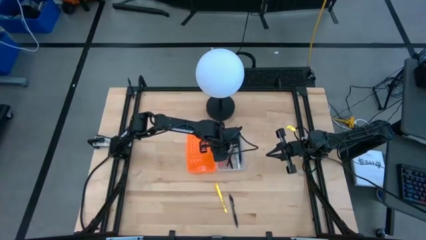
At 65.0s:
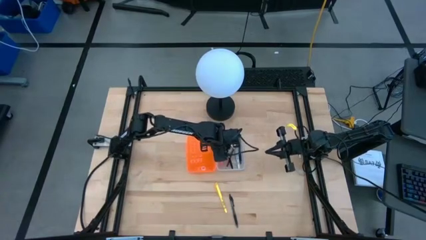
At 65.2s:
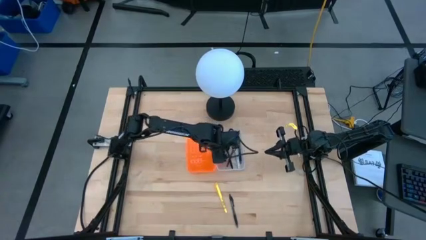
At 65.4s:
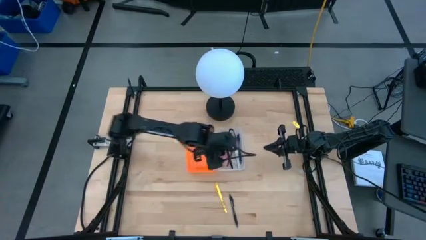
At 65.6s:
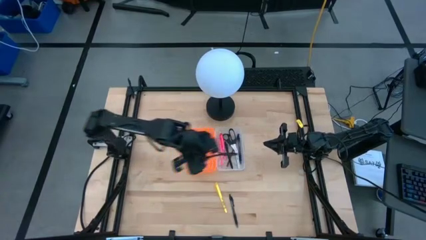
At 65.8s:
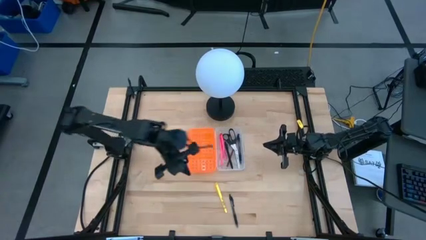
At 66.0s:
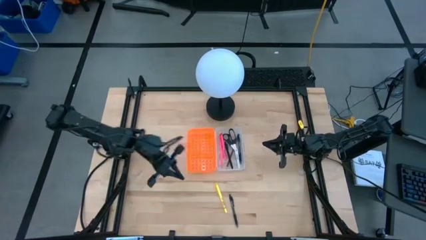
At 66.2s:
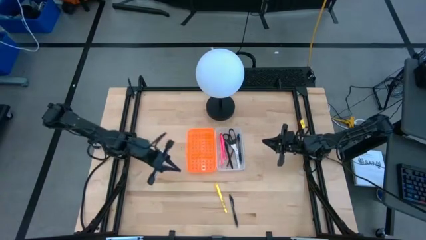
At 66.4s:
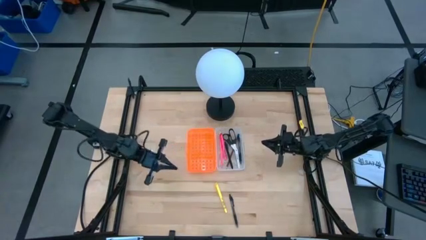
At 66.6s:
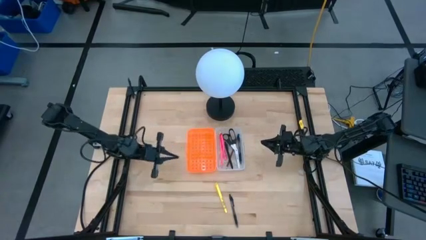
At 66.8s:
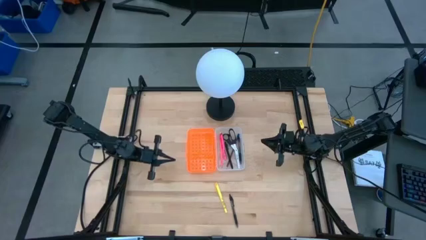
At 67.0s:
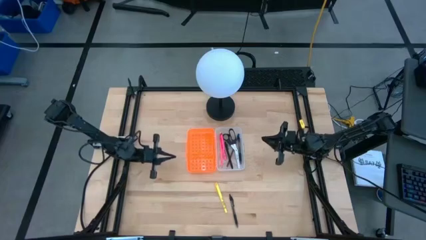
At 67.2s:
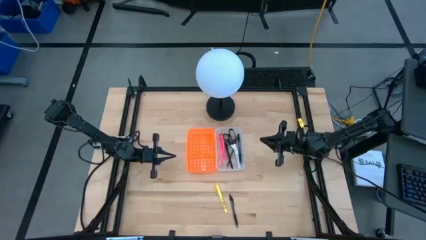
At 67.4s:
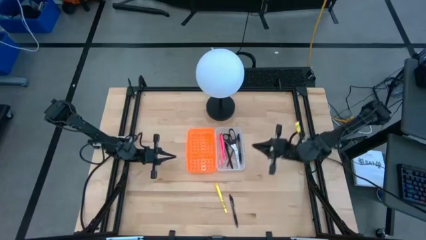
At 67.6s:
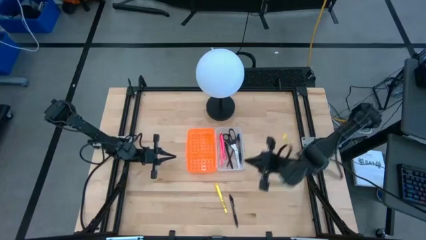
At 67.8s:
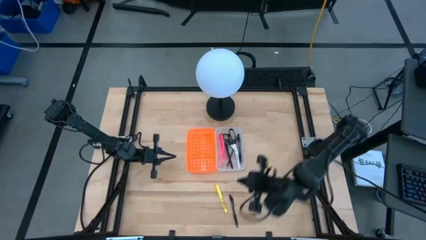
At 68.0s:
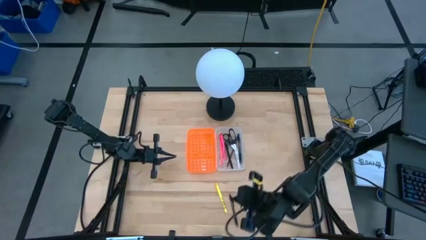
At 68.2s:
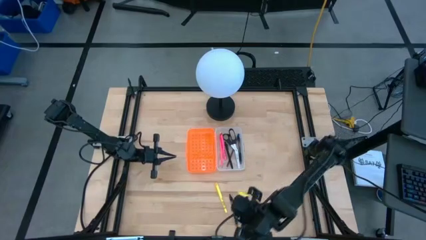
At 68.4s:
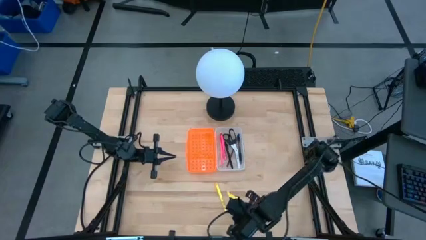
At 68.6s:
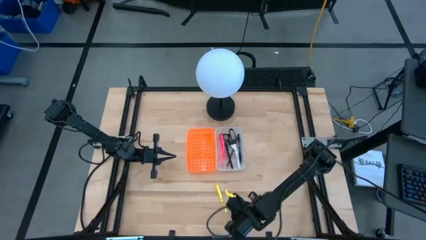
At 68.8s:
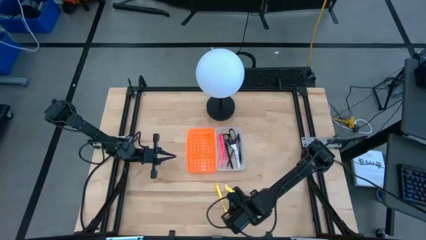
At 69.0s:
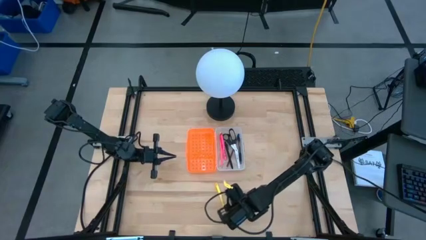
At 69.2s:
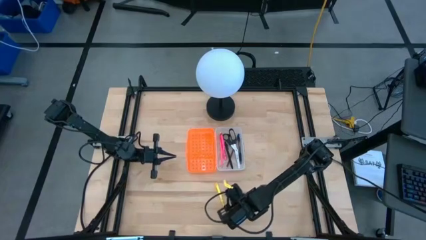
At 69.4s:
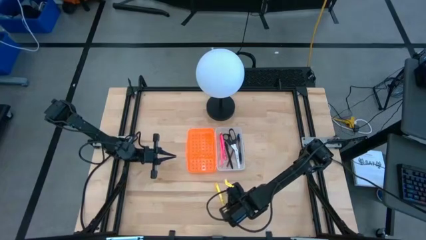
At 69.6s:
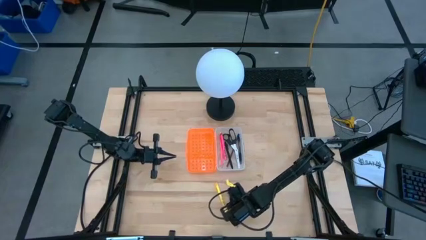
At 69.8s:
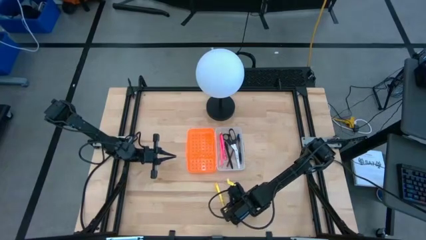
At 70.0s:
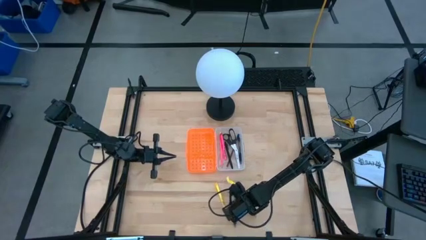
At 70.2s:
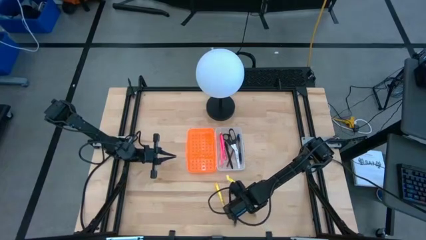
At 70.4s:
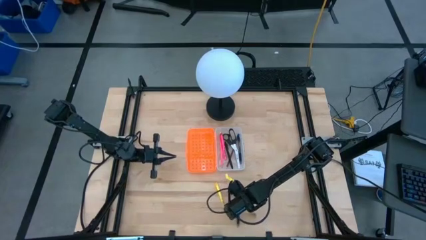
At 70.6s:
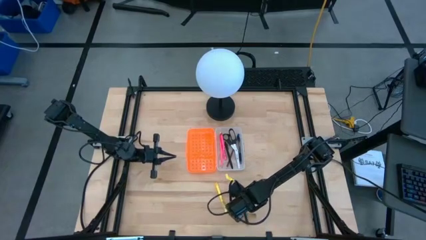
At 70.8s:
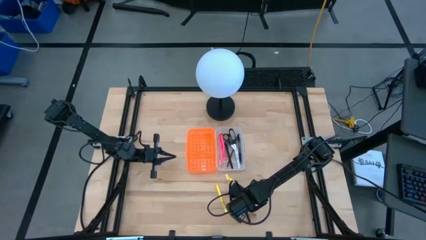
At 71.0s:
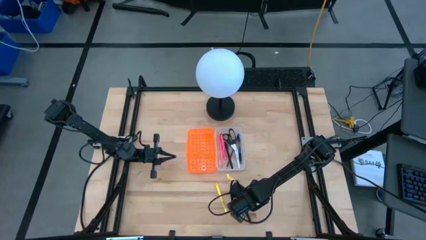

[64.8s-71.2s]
Task: Pick & place school supplies into a supply box
Put the black pen into the pencil box

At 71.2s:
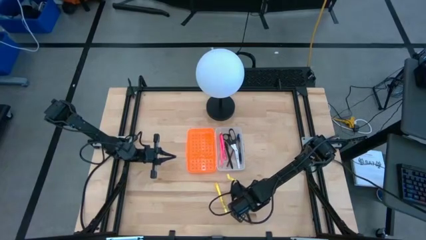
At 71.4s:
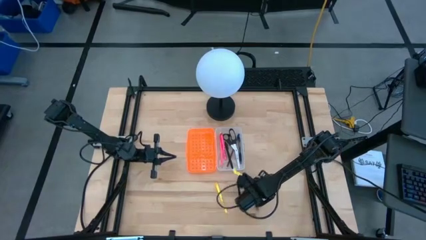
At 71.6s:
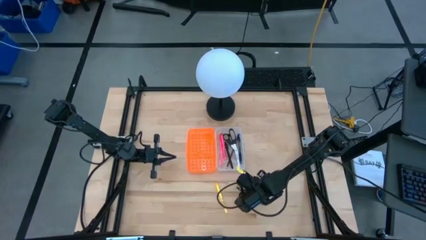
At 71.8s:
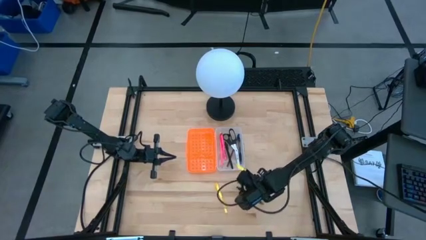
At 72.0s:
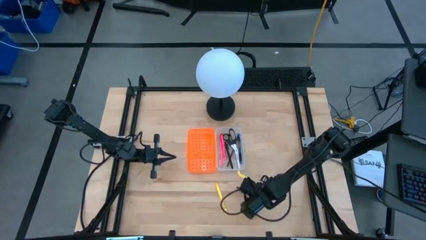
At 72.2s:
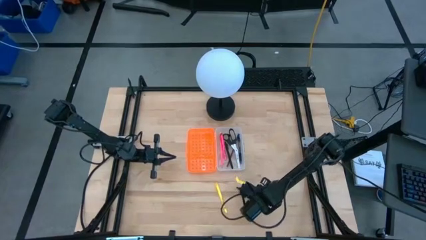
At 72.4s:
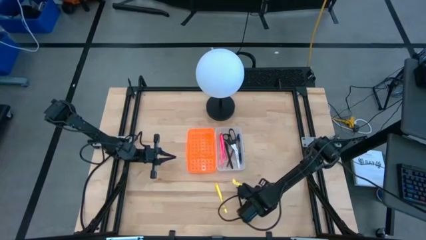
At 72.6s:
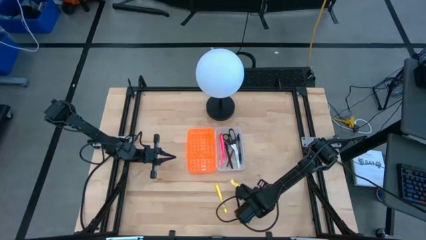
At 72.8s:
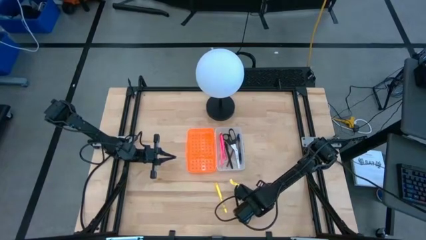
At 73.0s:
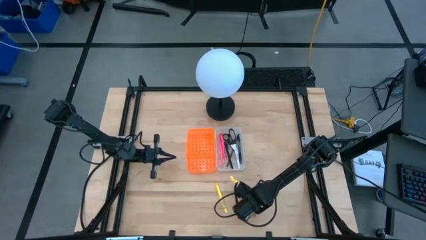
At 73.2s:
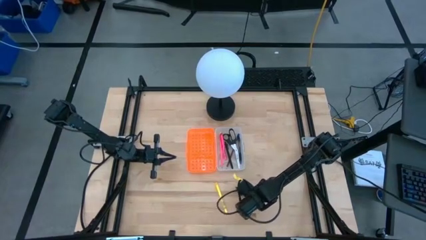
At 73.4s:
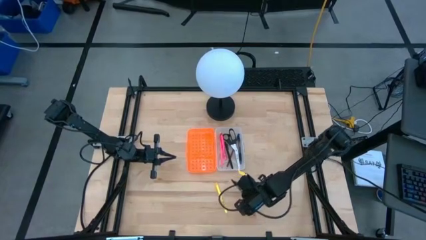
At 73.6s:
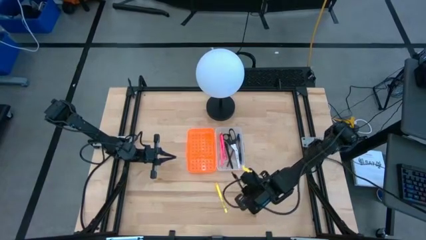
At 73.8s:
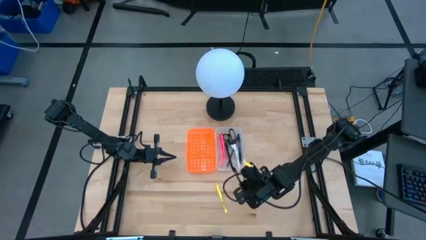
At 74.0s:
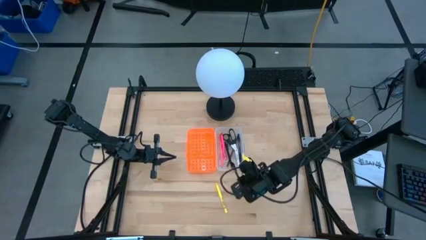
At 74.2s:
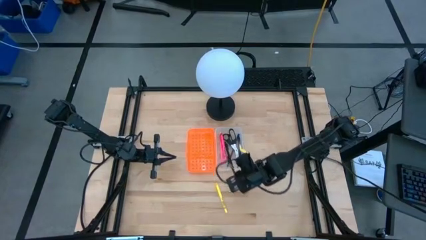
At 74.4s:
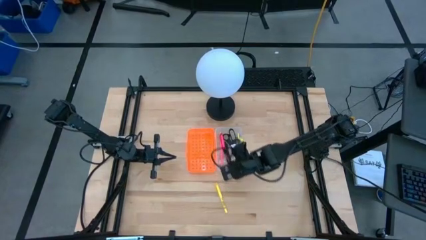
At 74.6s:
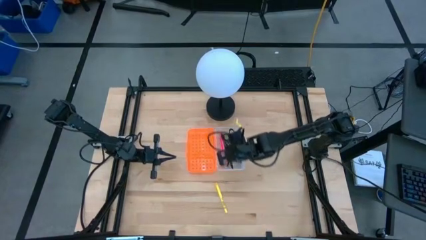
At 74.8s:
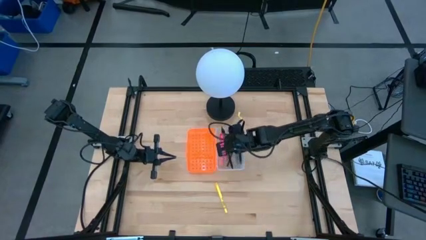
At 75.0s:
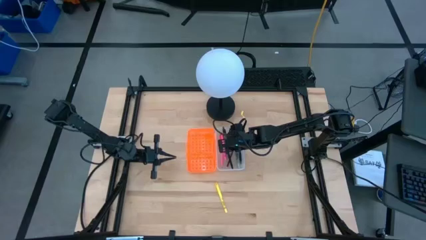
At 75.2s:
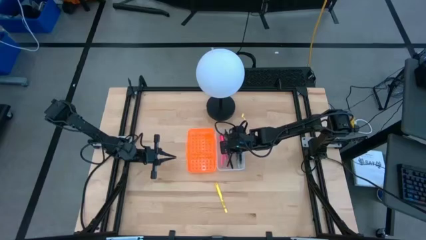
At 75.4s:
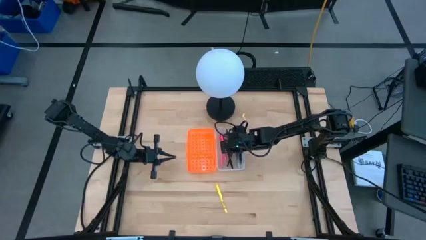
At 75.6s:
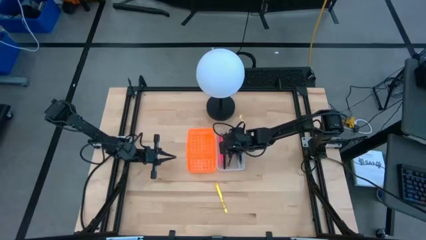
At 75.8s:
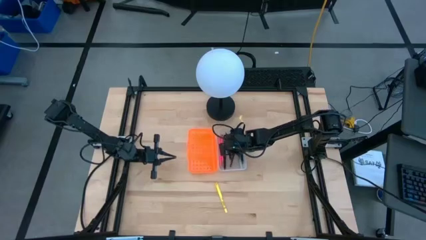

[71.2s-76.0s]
Put the black pen into the pencil box

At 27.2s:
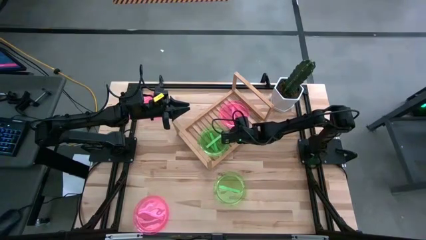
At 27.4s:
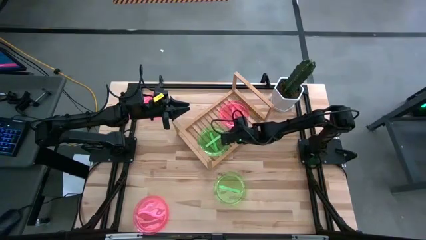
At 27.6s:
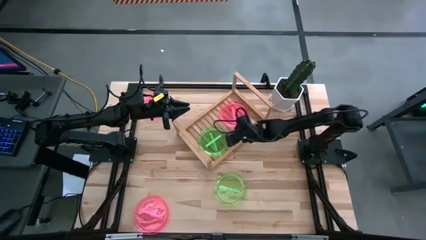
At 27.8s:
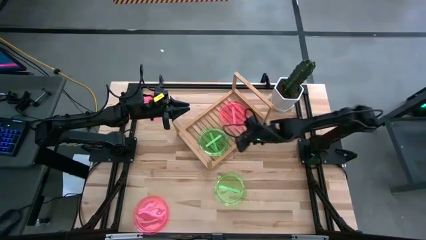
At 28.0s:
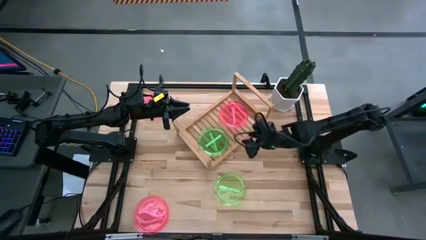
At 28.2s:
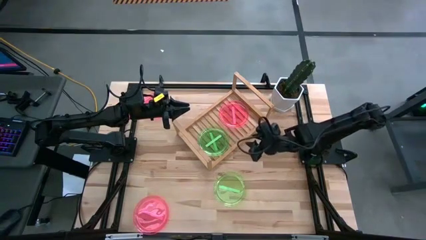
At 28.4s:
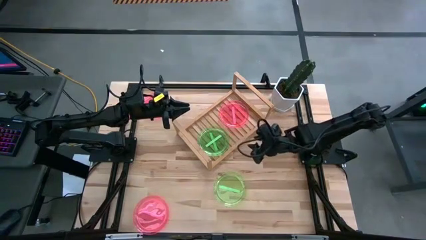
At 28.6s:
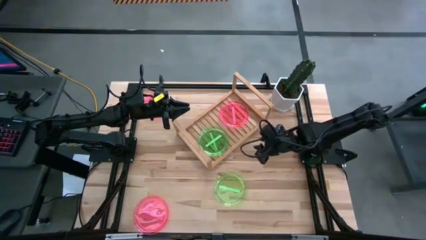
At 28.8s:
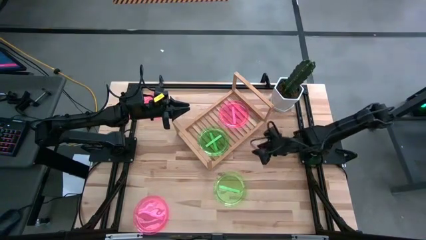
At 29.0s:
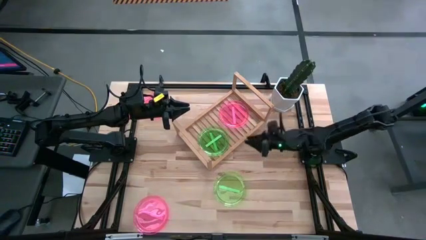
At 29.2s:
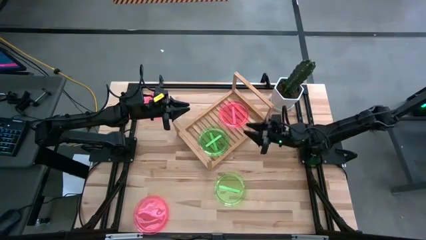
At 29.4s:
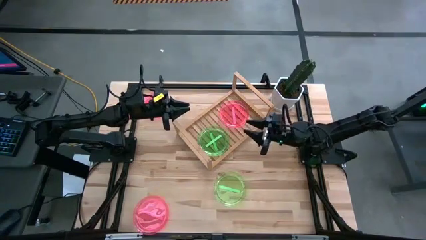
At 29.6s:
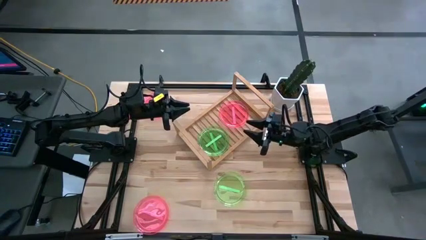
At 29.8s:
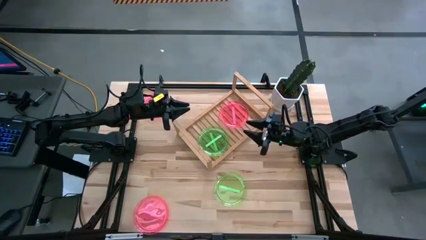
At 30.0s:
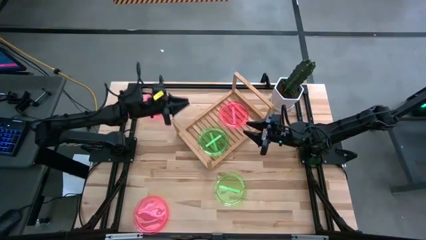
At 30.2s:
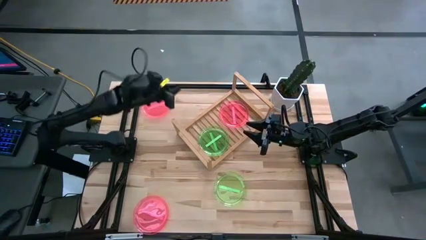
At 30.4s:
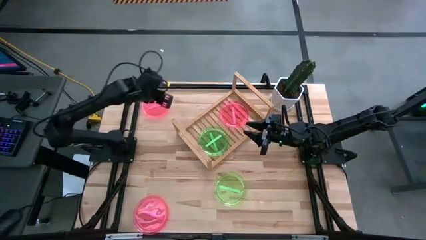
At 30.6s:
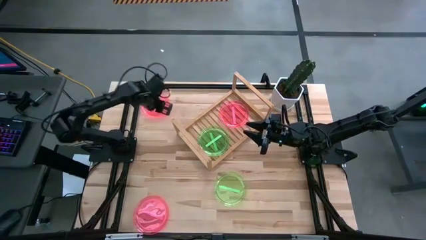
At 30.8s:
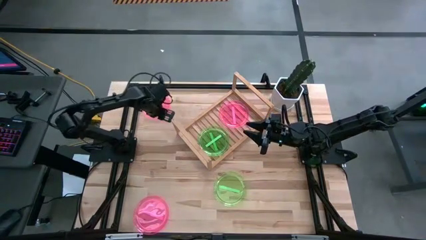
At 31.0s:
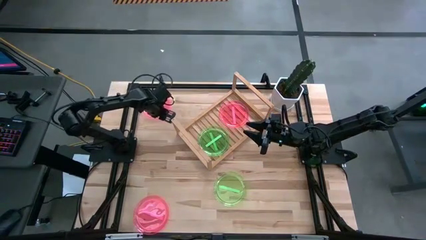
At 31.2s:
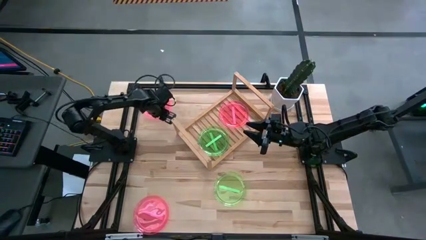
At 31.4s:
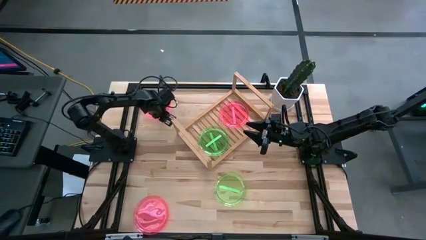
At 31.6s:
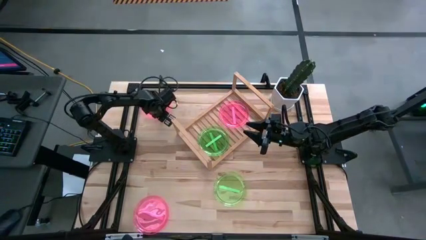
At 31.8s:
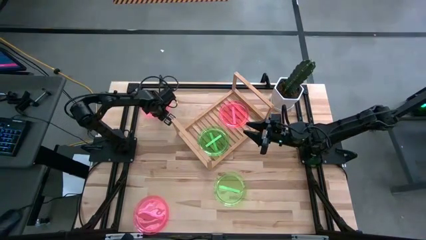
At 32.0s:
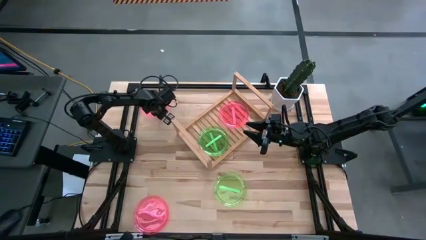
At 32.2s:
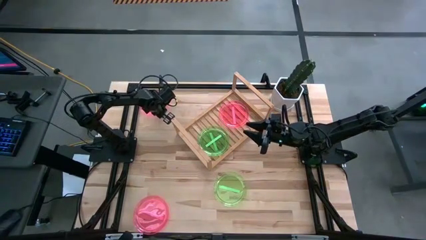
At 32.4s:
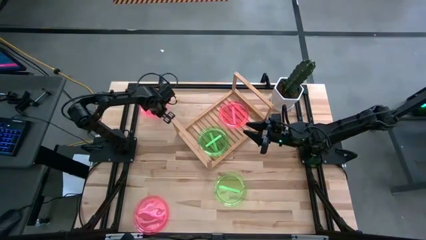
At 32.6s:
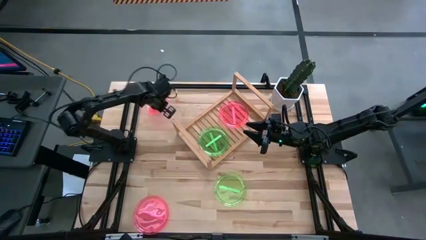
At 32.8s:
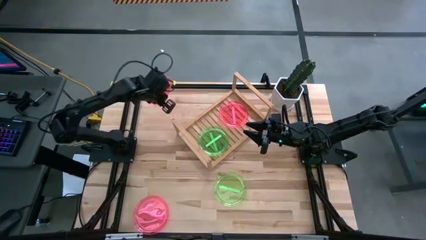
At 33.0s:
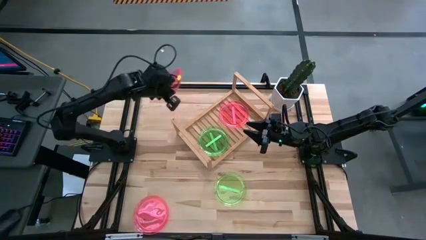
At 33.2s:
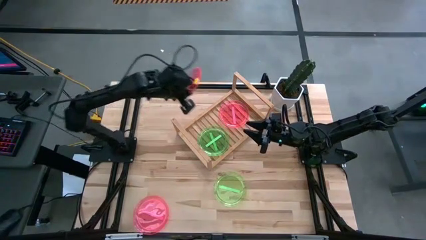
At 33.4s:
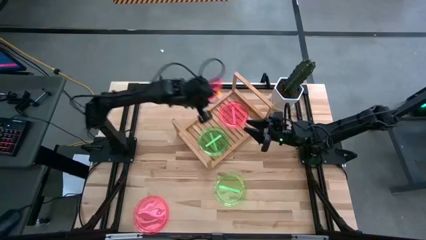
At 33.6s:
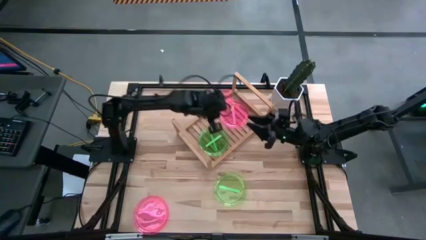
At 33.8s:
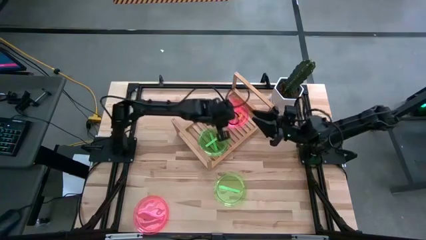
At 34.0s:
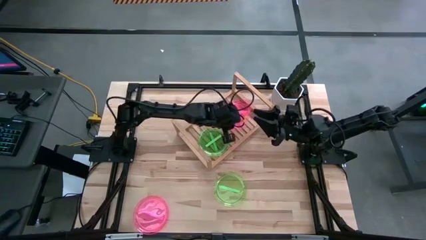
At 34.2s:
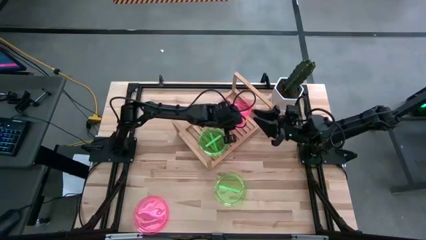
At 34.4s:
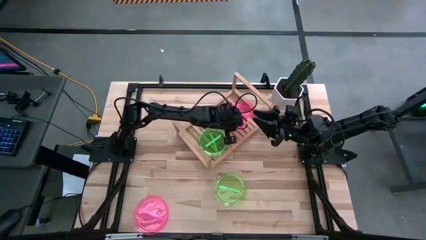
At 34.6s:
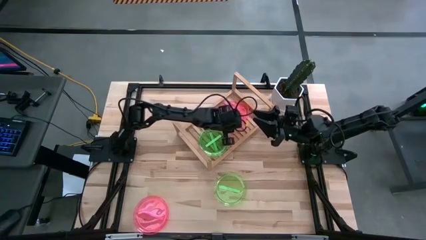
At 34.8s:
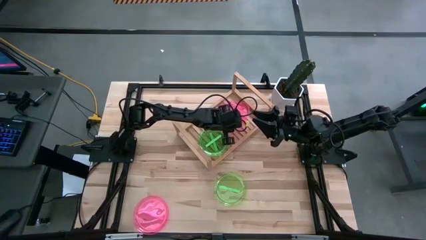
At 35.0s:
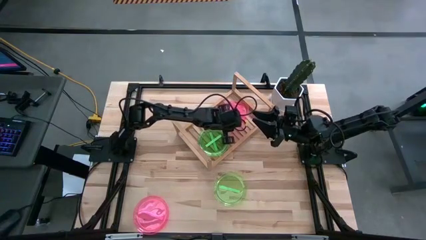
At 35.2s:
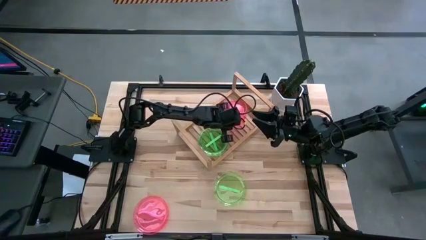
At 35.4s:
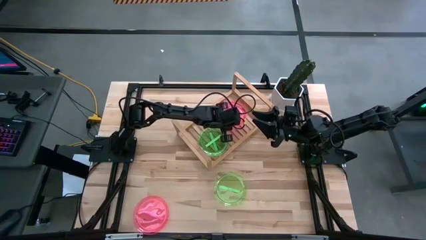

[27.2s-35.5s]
Task: Place and stack plates onto a shelf
Stack the top pink plate on top of the other pink plate on the shelf
